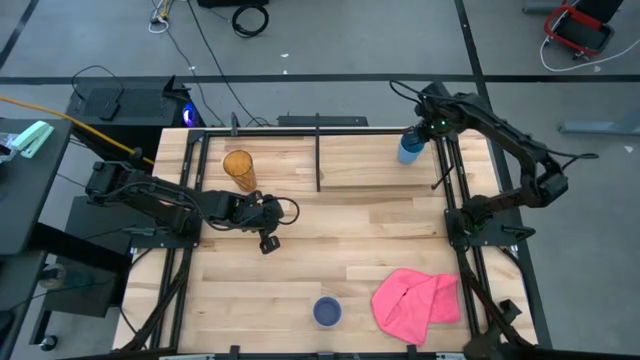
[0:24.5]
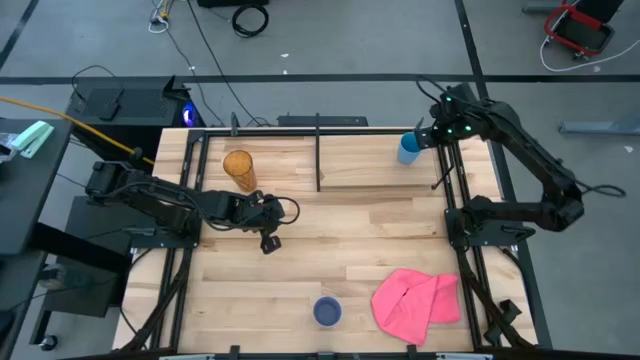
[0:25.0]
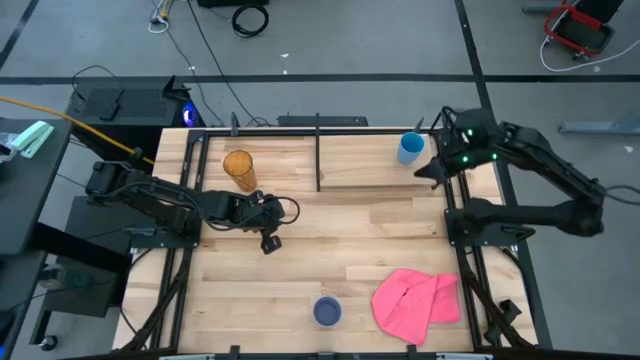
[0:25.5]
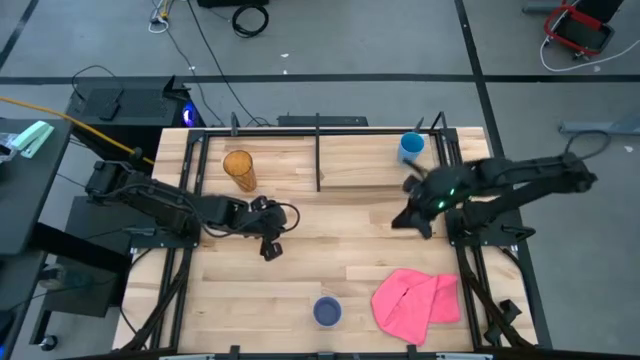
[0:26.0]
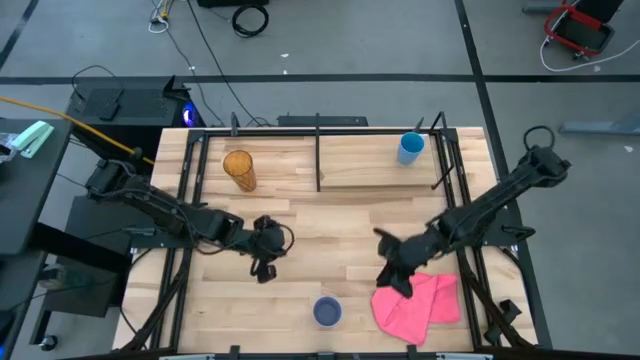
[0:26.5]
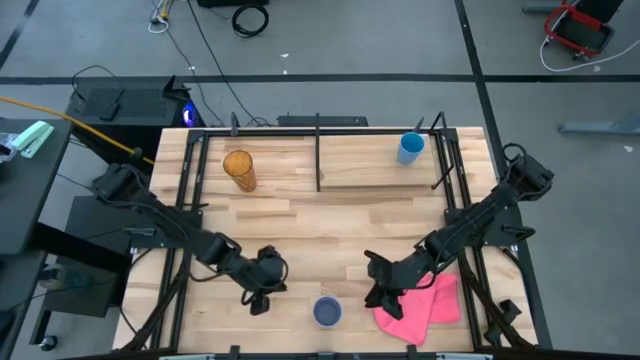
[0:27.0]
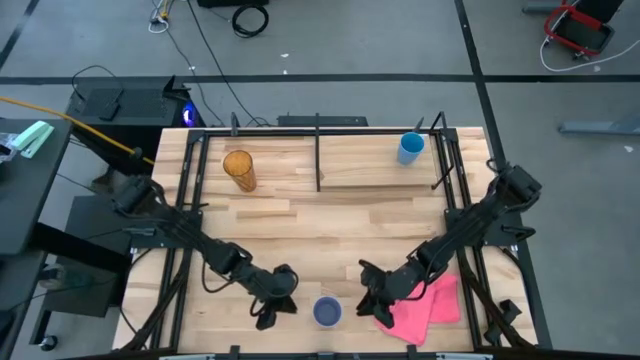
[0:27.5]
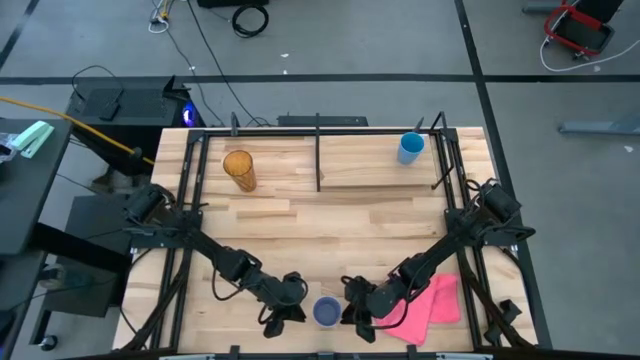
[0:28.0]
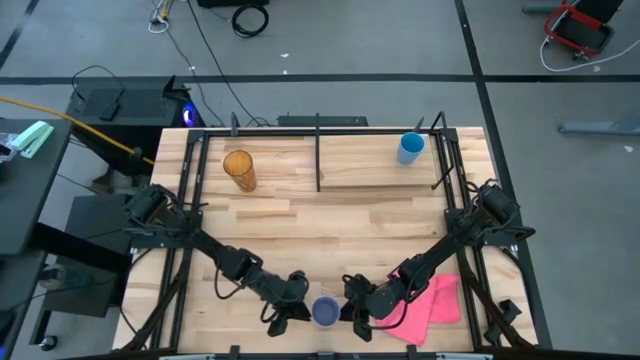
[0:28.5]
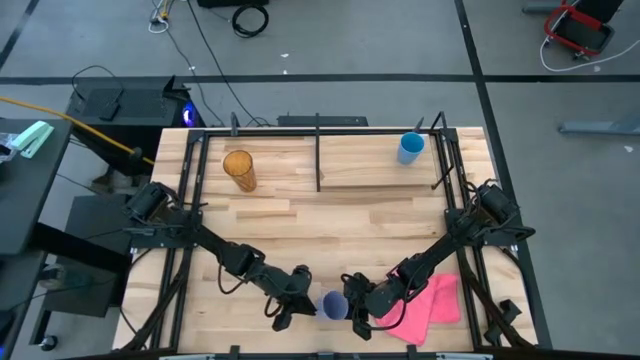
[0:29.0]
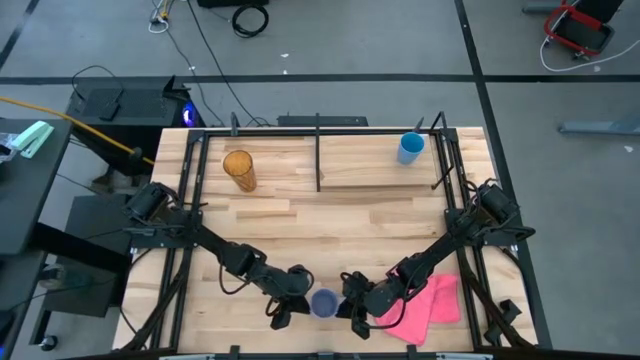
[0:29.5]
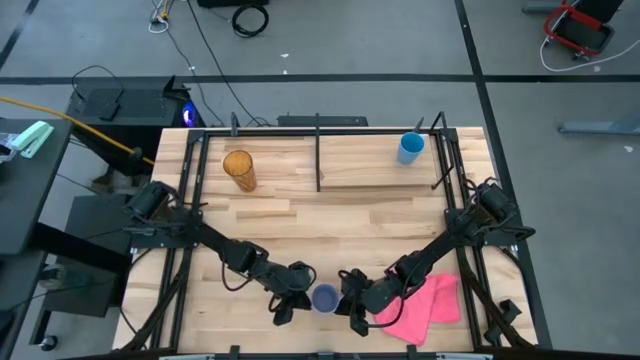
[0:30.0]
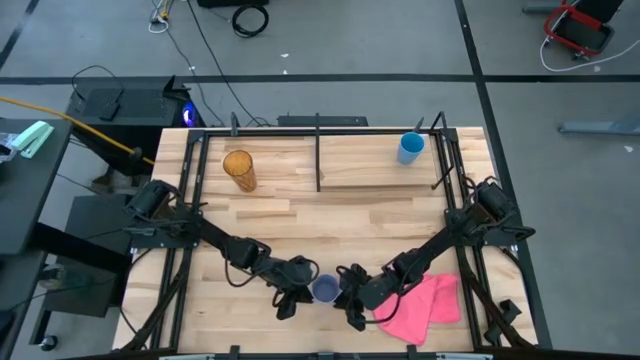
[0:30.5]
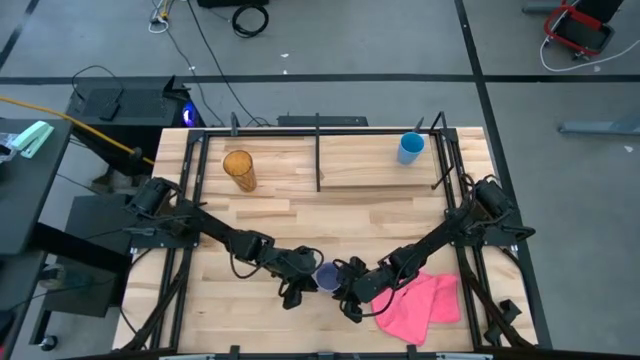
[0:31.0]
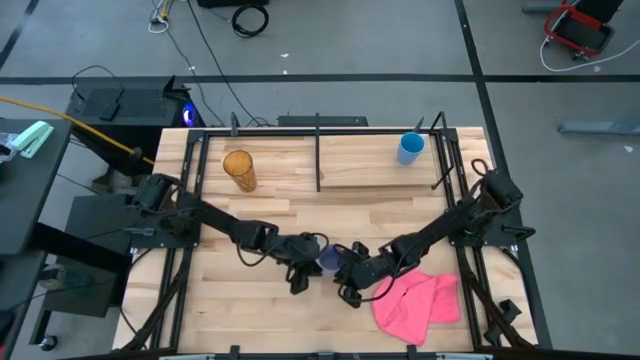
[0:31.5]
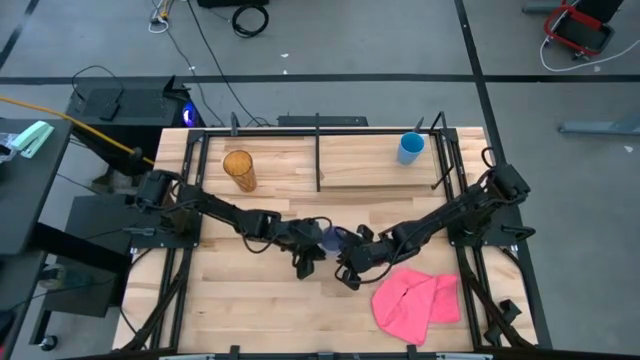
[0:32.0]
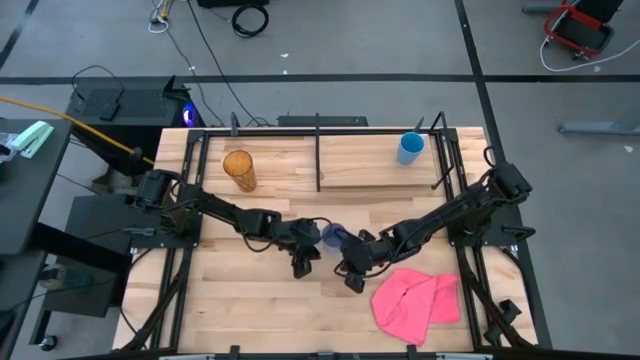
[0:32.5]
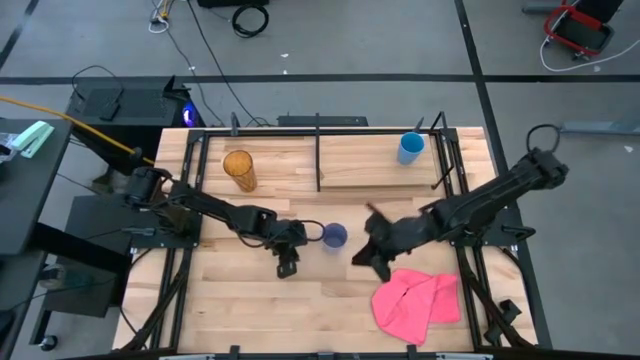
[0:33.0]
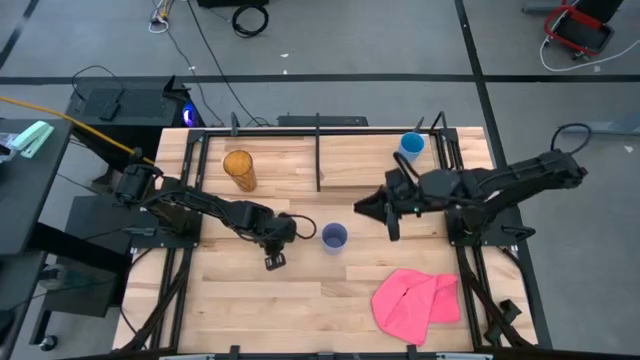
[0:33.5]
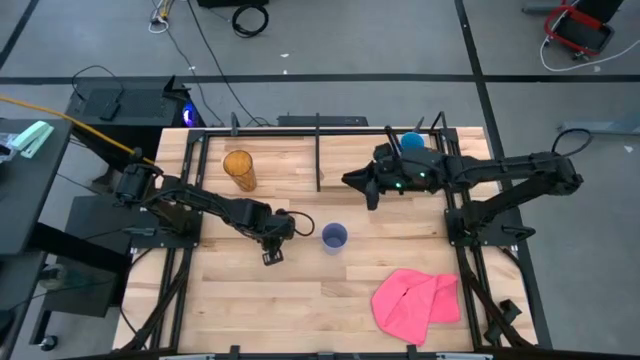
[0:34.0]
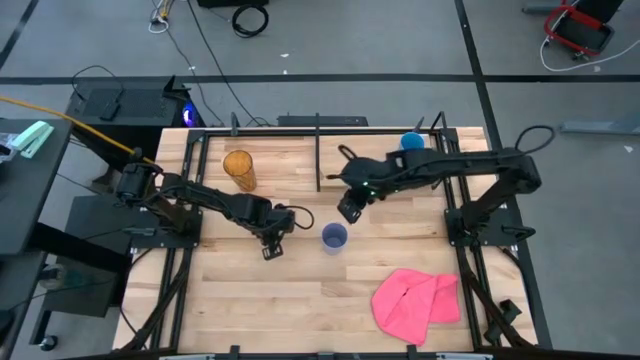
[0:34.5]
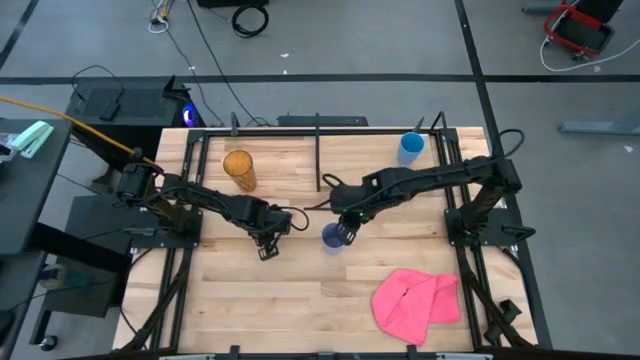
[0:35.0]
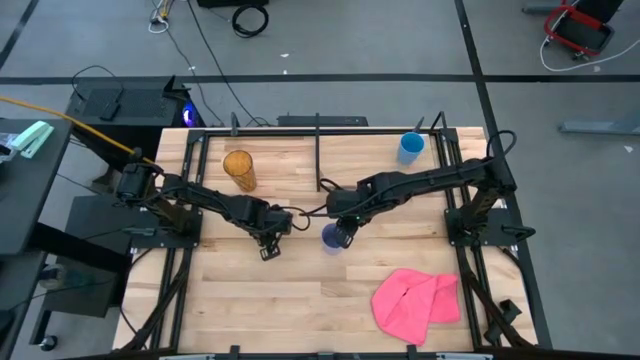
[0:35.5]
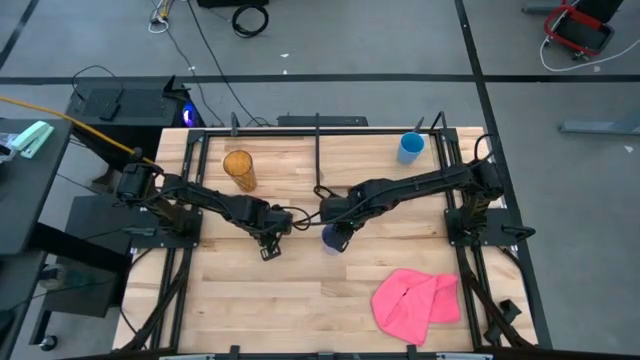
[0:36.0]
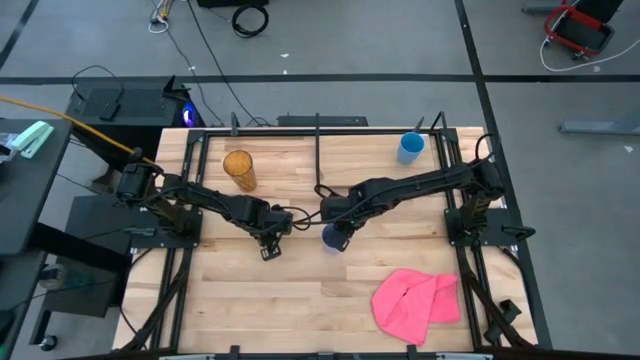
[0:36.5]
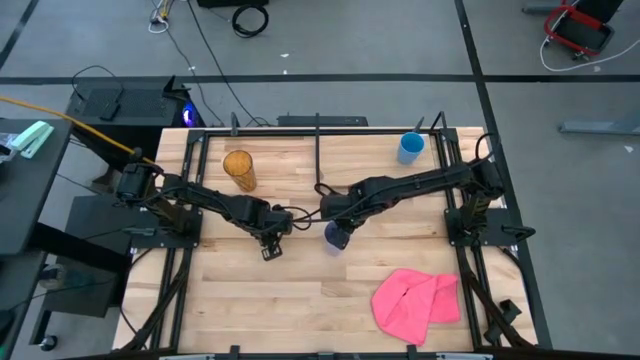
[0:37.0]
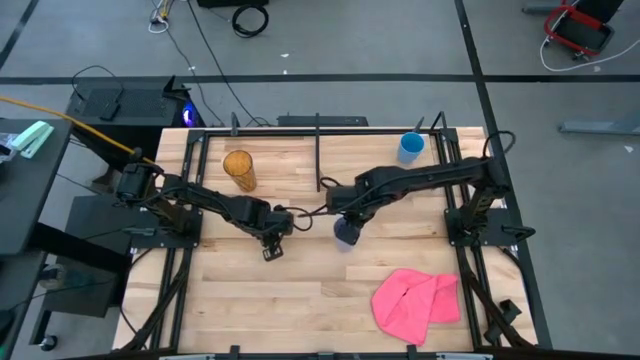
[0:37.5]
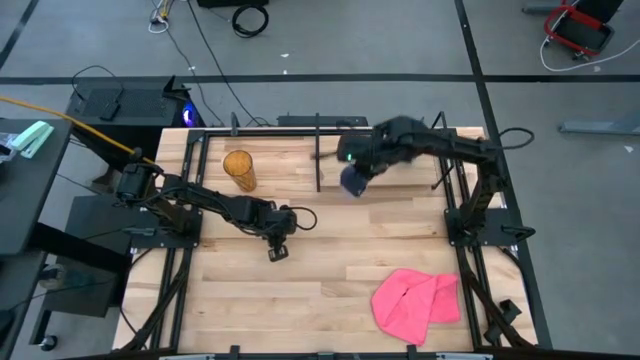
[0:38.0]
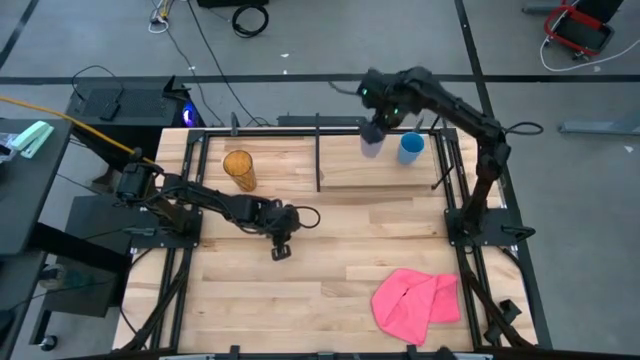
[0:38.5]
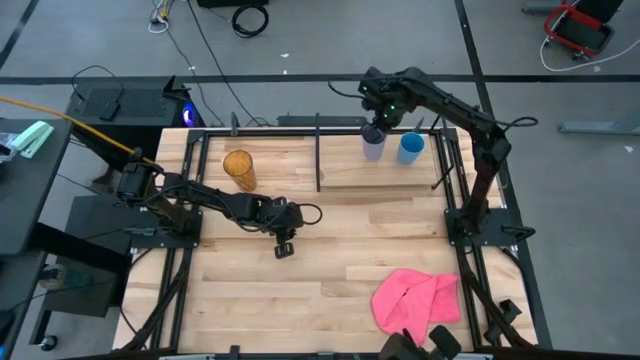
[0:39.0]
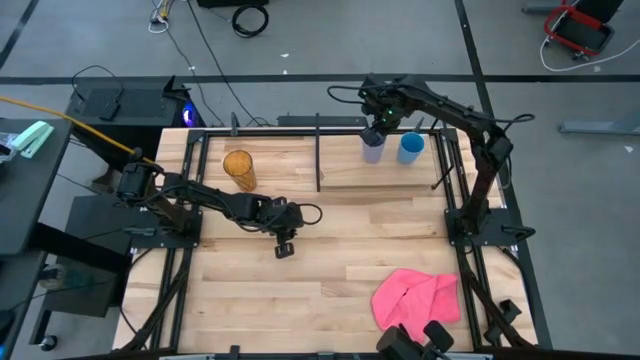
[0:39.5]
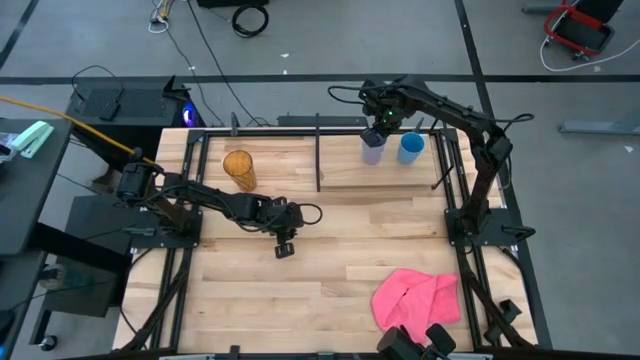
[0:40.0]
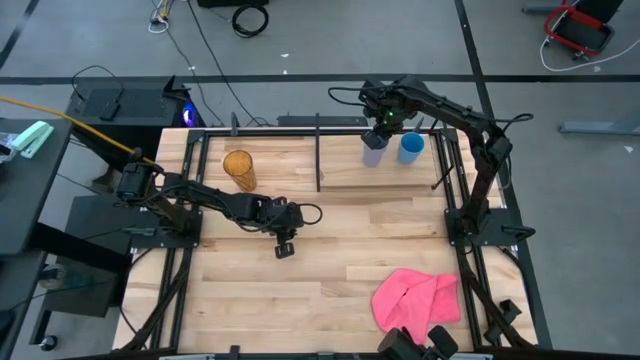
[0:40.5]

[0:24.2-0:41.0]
Task: Stack small to large cups/mugs on shelf
Put the purple cup on the shelf

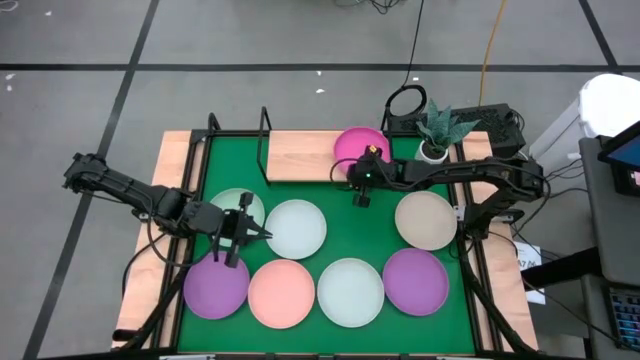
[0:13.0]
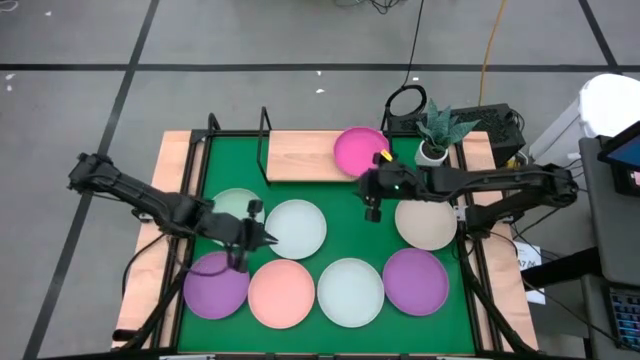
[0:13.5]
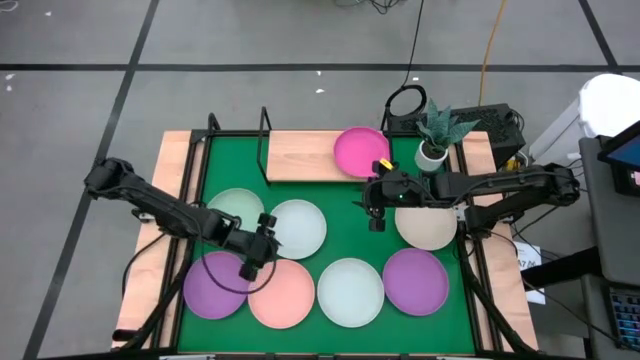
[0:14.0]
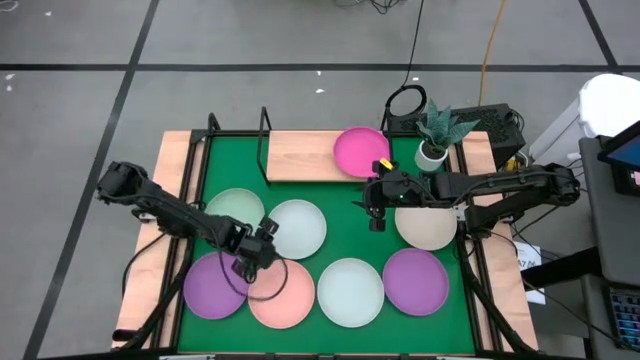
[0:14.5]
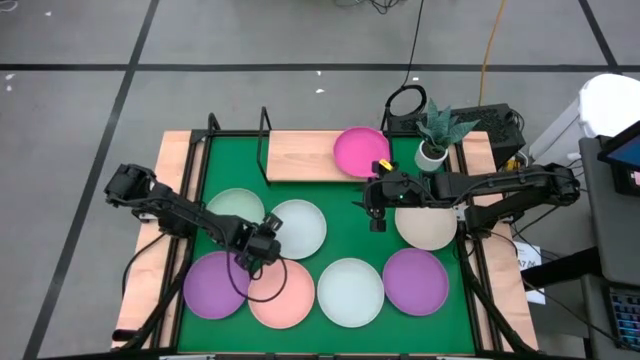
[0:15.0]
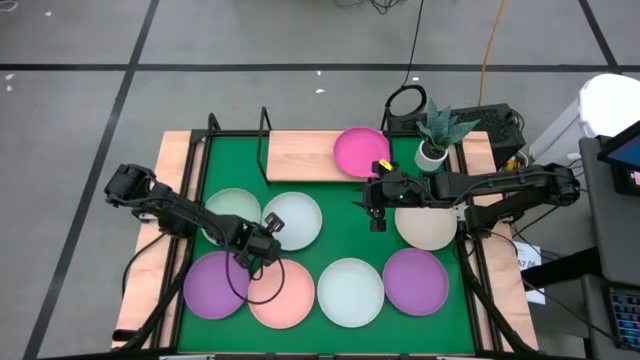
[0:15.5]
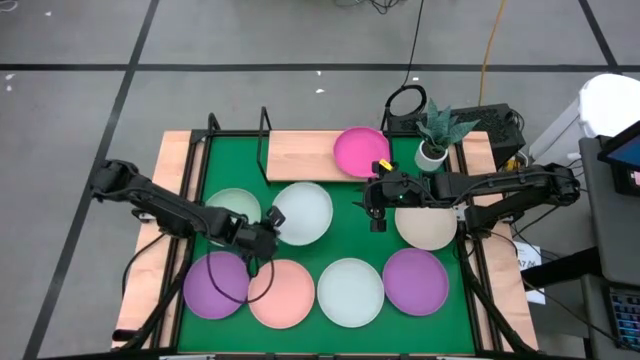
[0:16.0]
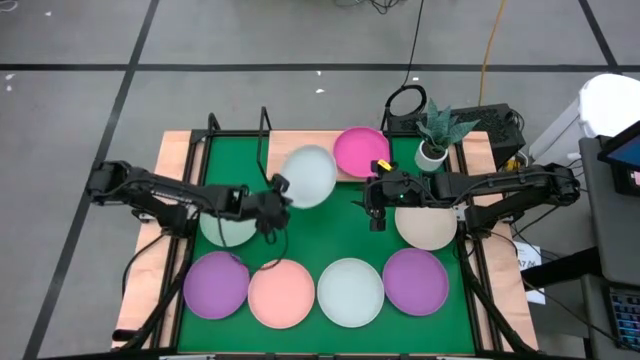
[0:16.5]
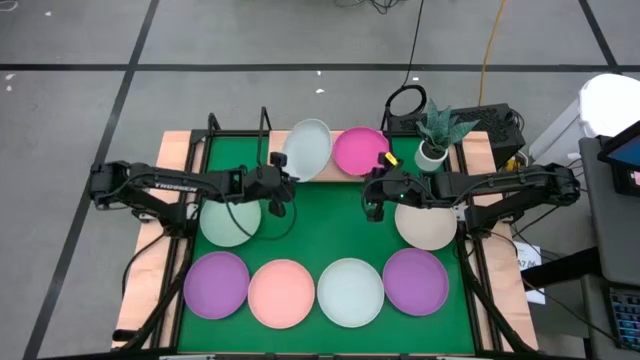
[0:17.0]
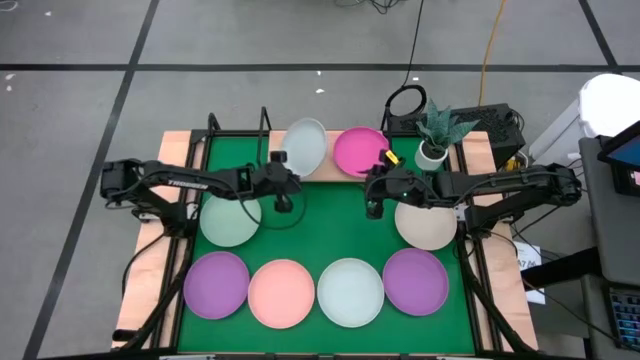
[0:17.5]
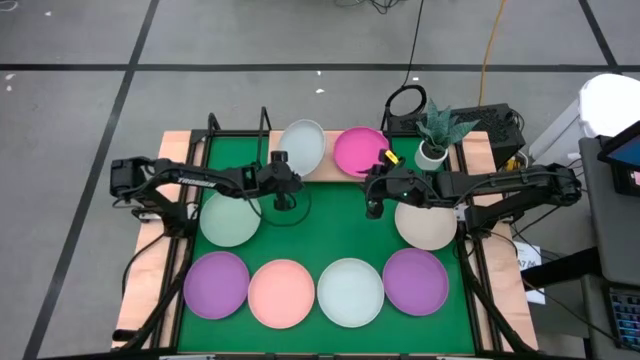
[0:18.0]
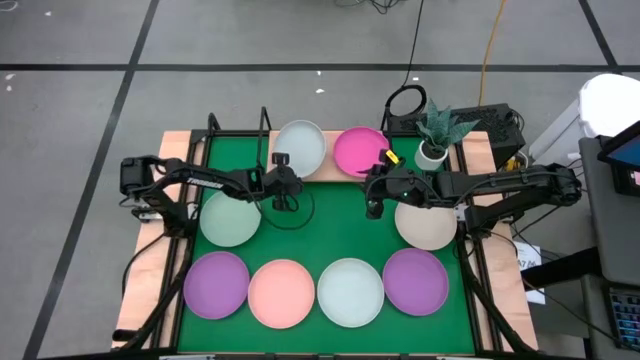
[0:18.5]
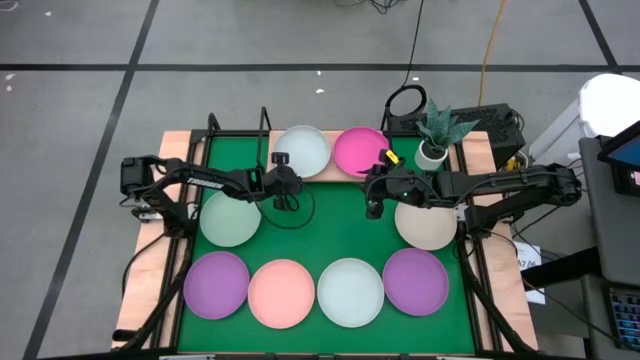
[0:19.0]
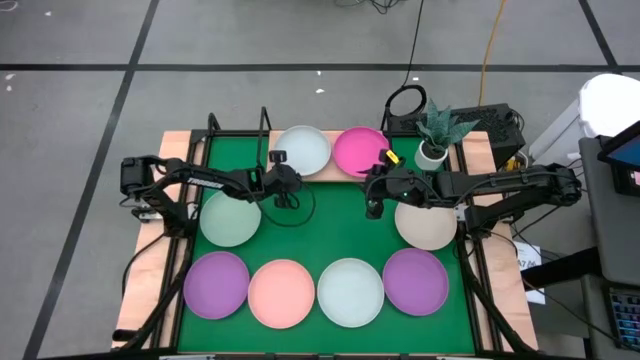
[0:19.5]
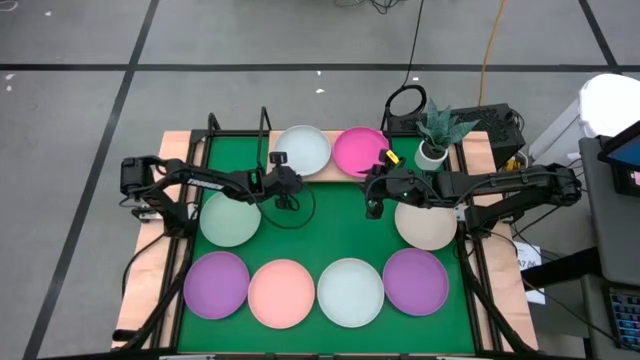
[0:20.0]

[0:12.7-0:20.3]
Task: Place and stack plates onto a shelf
Put the top gray plate on the shelf
